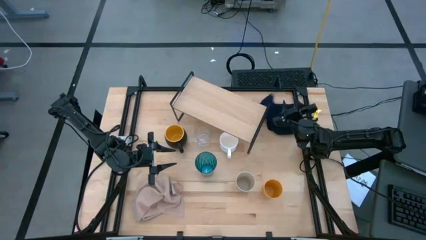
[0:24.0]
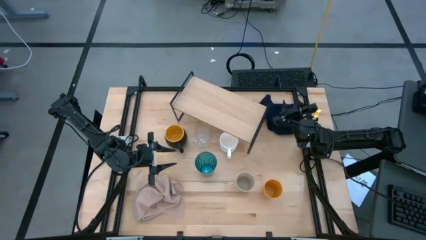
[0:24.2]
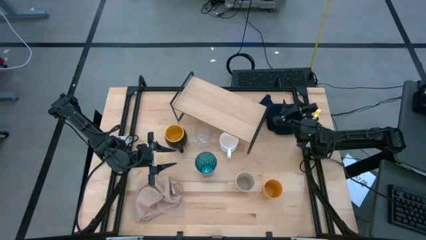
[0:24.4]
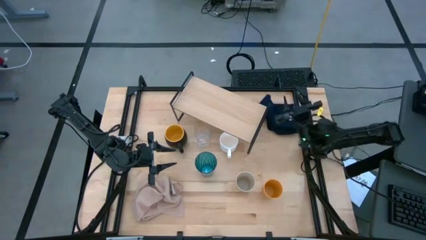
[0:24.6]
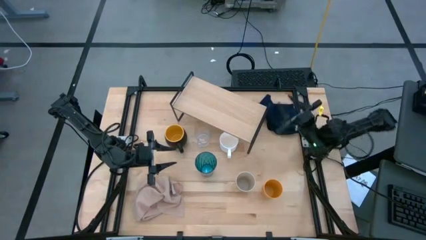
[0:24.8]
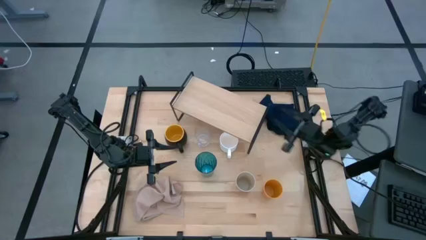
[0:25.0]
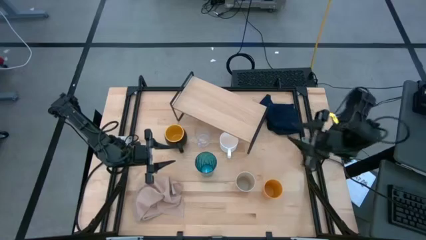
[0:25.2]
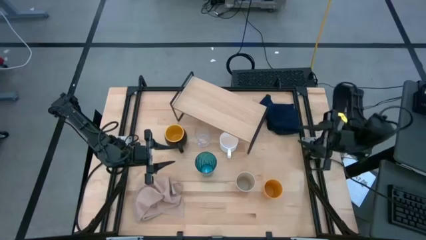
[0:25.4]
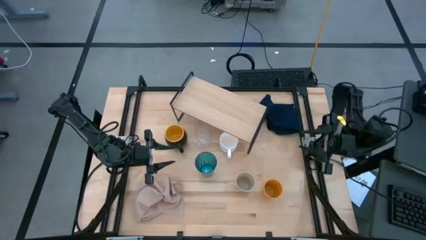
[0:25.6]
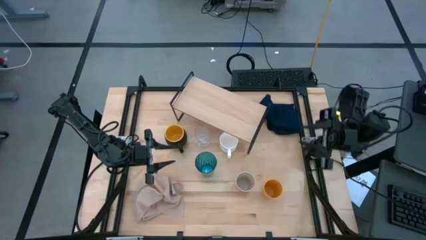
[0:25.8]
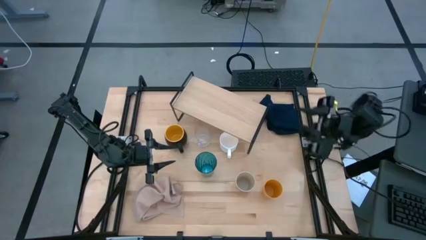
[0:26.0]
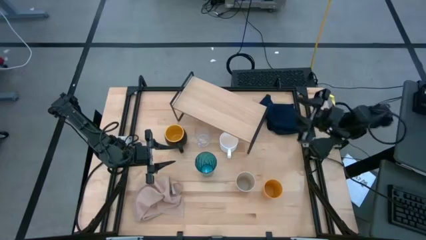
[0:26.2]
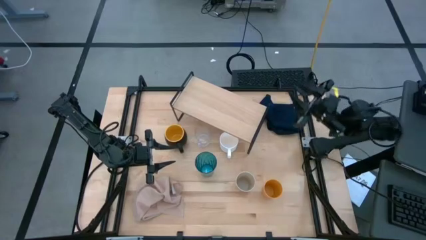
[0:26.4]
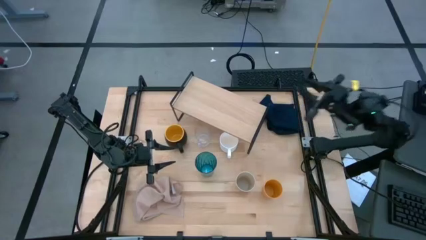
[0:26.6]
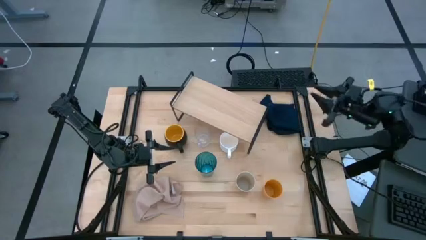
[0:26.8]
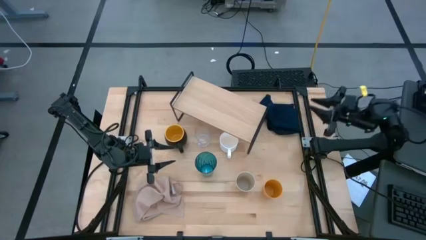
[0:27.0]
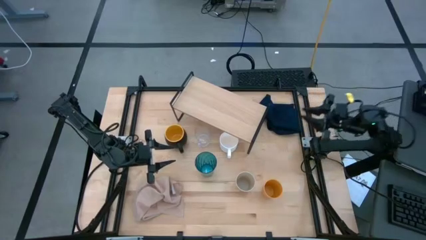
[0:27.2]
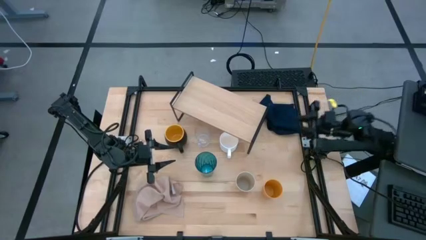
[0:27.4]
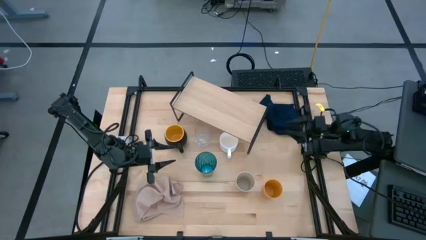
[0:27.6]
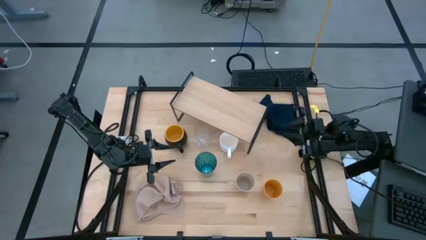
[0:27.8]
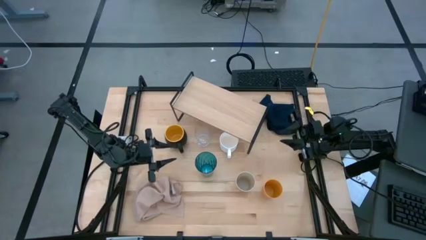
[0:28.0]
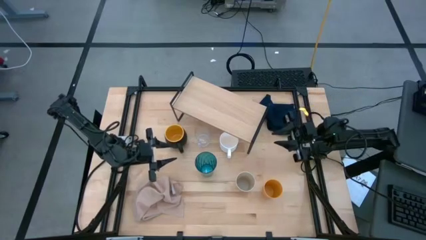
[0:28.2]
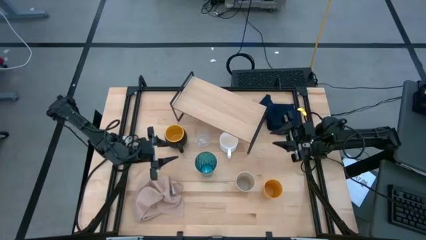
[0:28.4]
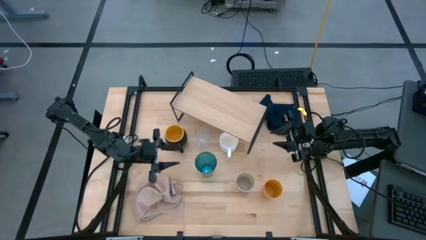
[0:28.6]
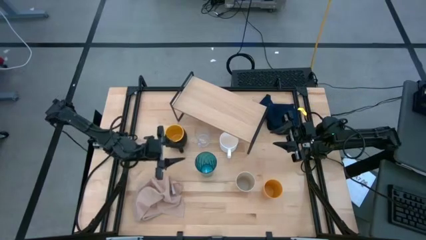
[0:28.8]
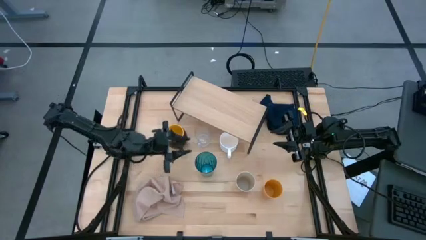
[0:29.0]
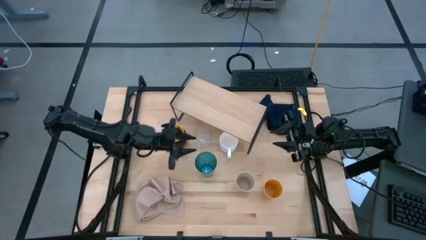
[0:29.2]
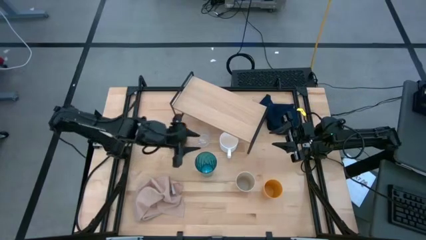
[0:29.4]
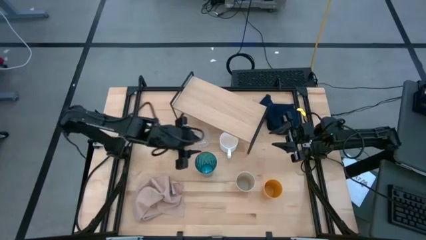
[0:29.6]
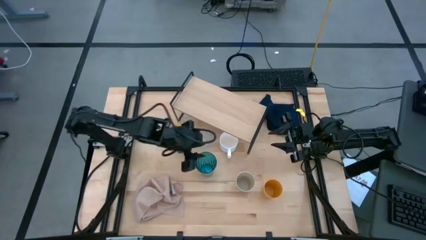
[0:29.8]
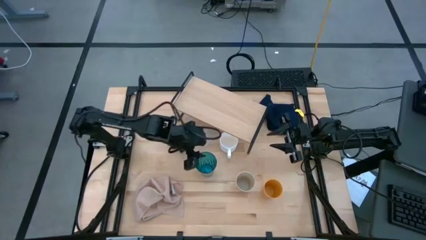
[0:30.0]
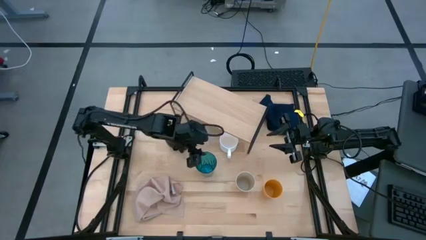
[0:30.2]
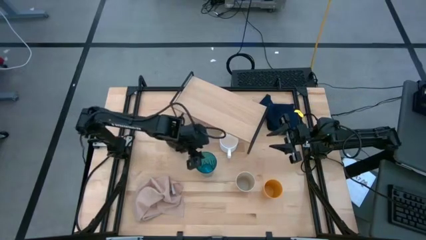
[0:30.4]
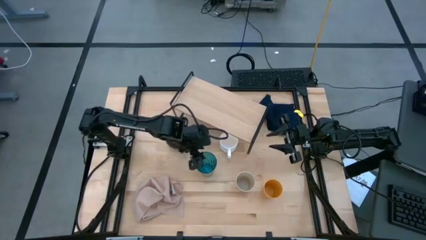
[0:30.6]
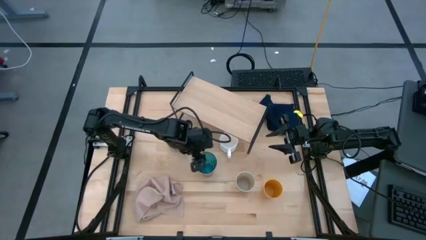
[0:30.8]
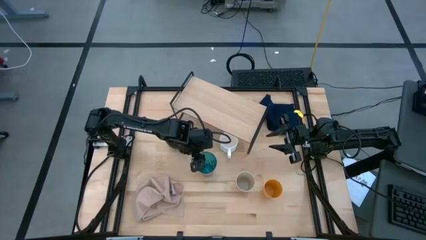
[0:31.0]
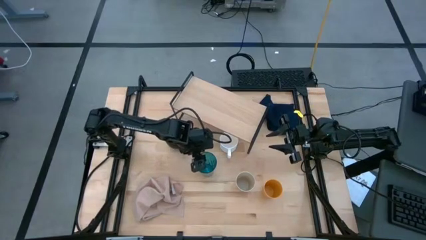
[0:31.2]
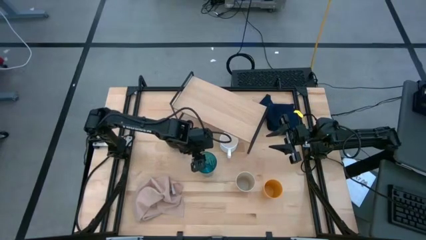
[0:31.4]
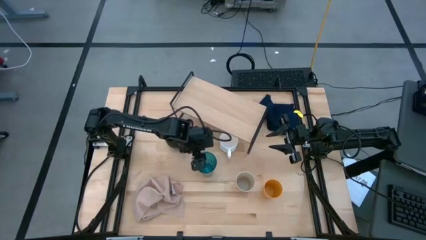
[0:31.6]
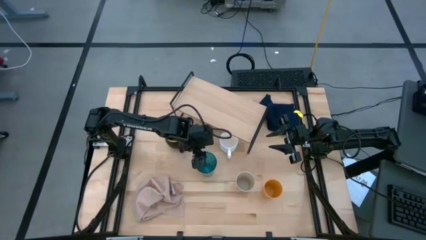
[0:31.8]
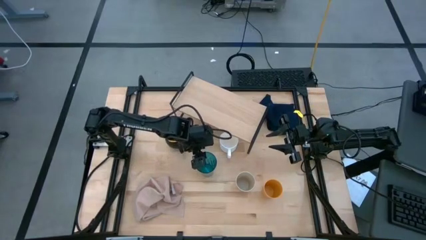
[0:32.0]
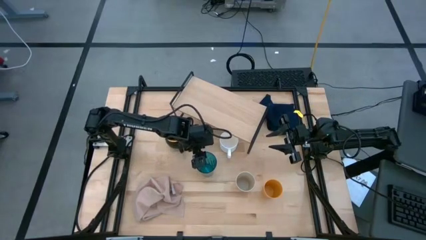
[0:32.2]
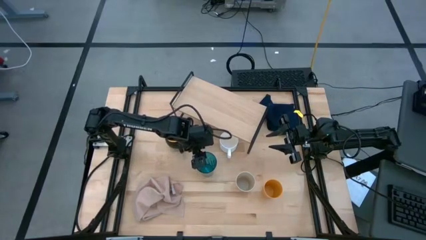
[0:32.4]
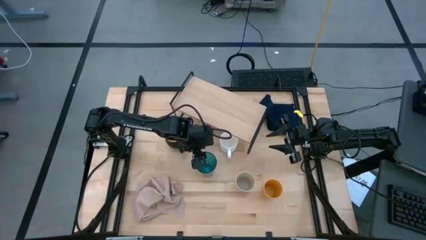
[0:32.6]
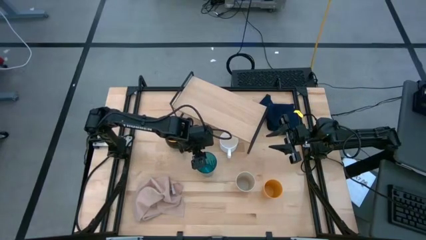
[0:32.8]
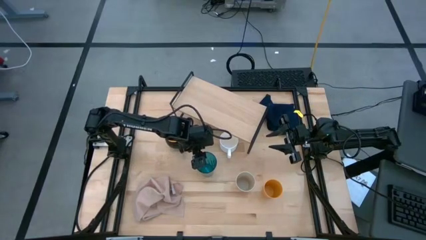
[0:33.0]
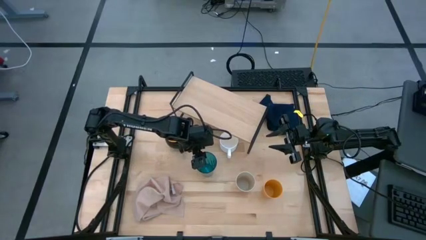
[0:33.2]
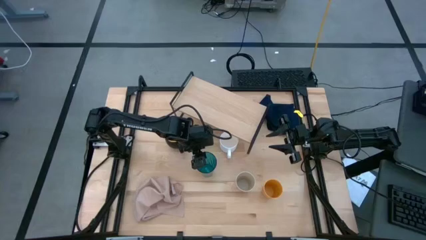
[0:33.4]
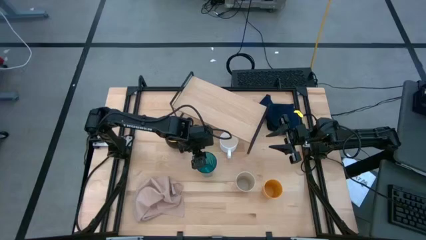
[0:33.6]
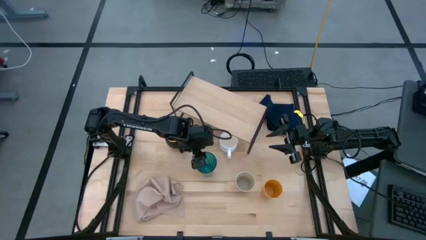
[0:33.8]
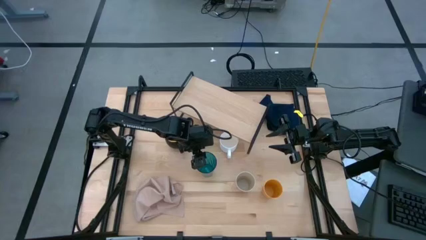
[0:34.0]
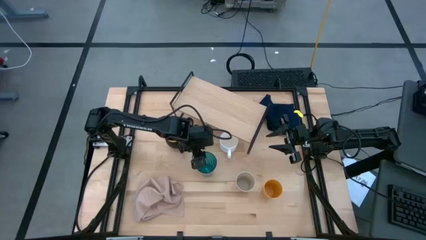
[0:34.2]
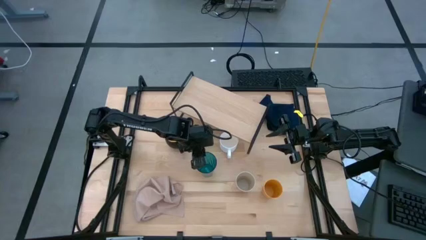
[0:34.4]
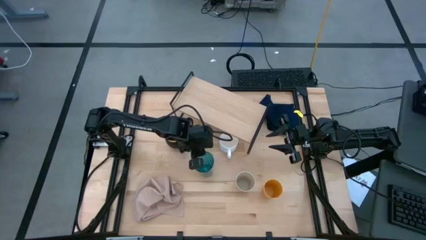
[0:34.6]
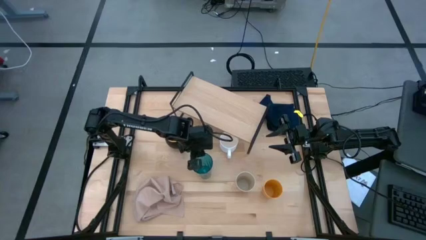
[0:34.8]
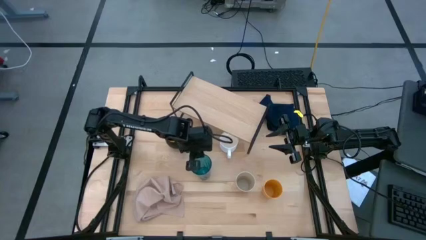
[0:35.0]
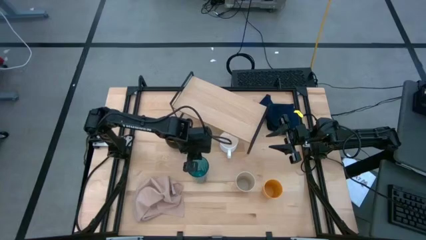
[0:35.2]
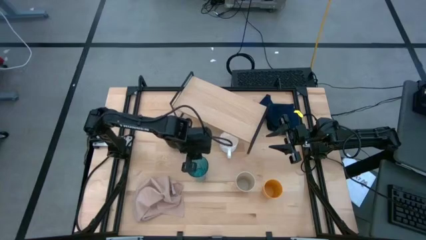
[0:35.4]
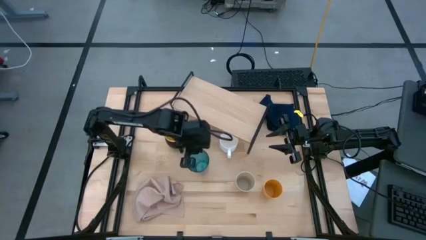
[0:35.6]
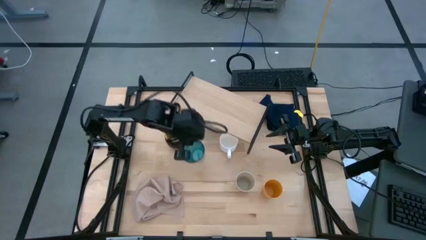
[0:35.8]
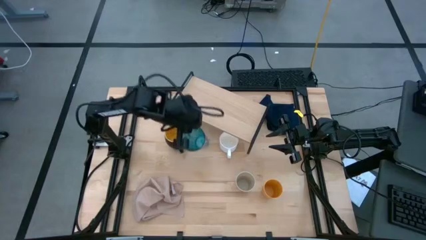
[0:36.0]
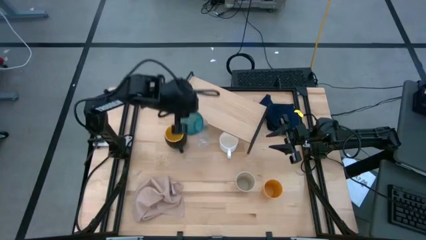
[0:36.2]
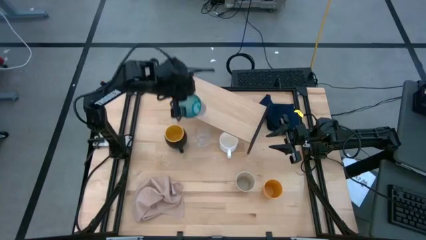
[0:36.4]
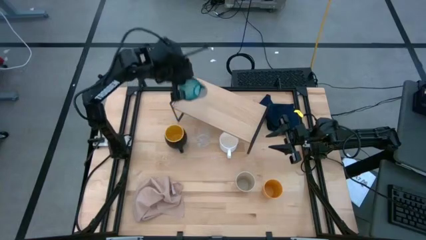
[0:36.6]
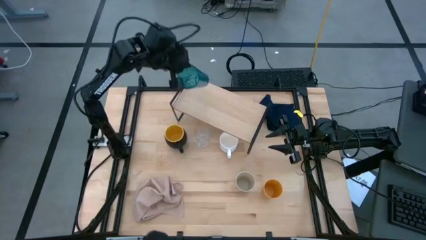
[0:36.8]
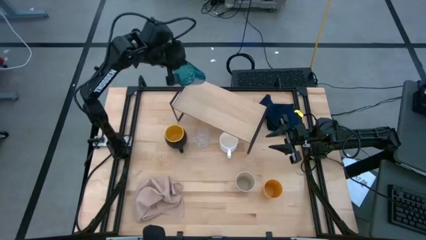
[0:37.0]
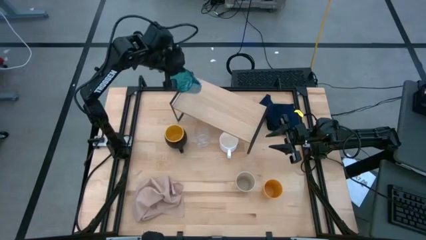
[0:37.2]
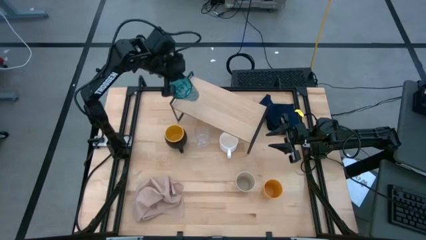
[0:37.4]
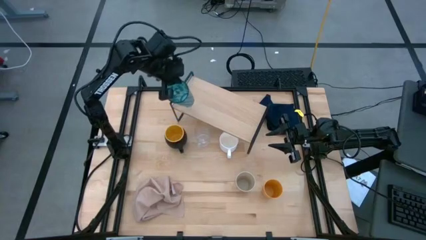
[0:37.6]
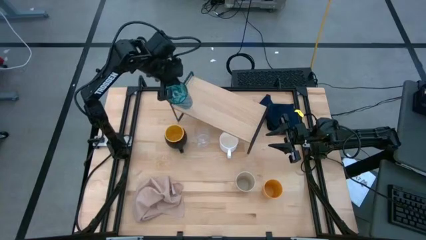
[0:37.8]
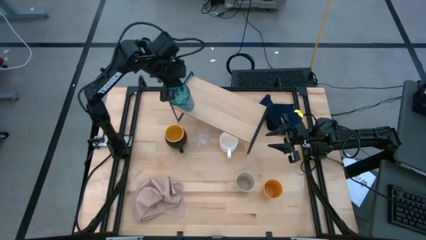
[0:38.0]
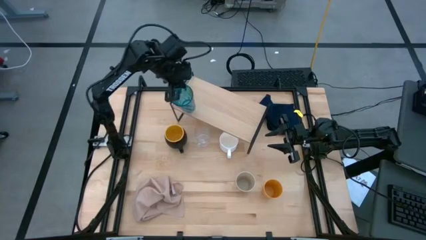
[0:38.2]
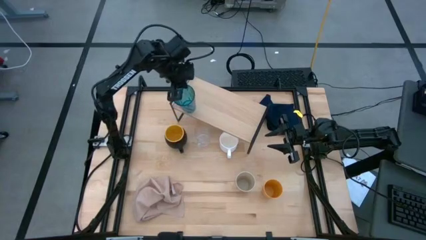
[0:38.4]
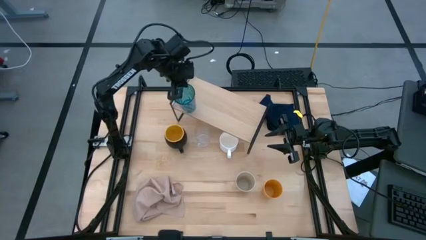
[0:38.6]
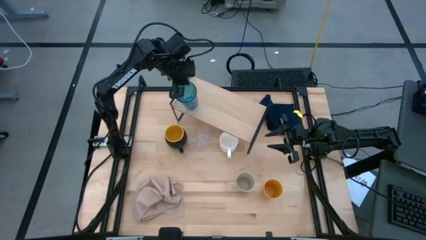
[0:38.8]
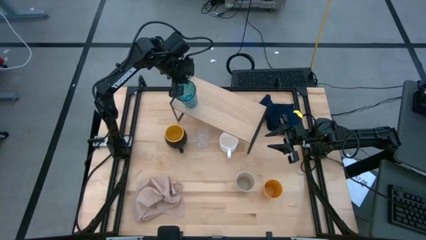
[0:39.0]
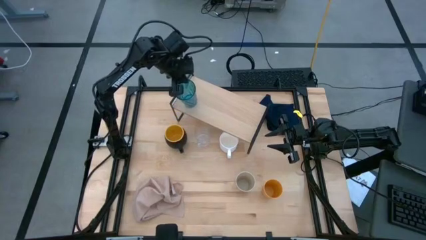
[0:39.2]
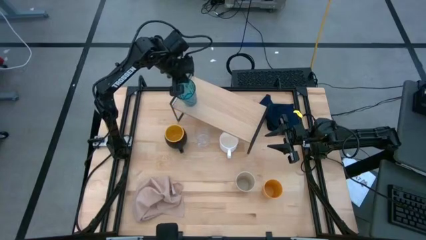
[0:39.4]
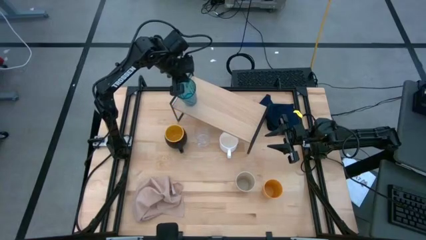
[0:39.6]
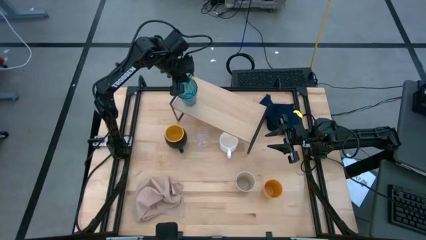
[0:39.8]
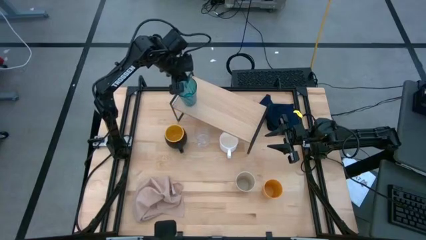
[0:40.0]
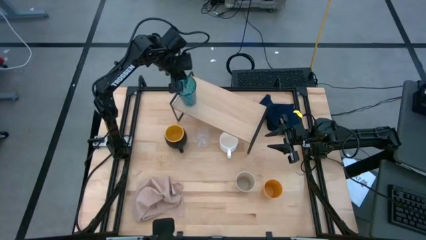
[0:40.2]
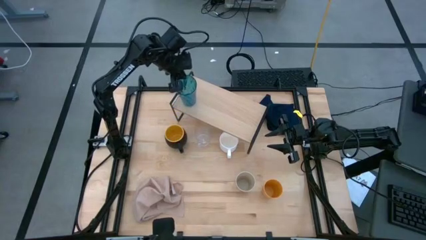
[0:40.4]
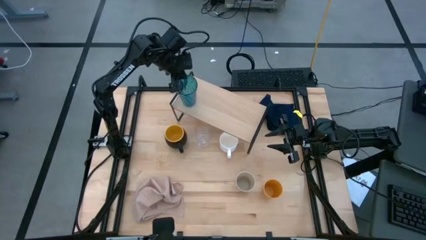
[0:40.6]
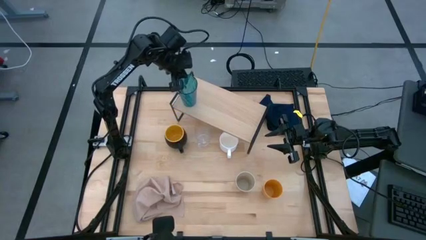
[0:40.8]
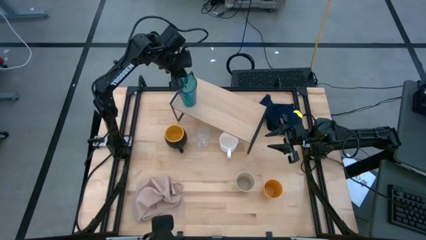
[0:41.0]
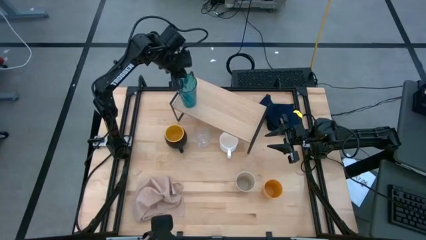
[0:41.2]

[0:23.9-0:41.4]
Task: Stack small to large cups/mugs on shelf
Put the blue glass on the shelf
